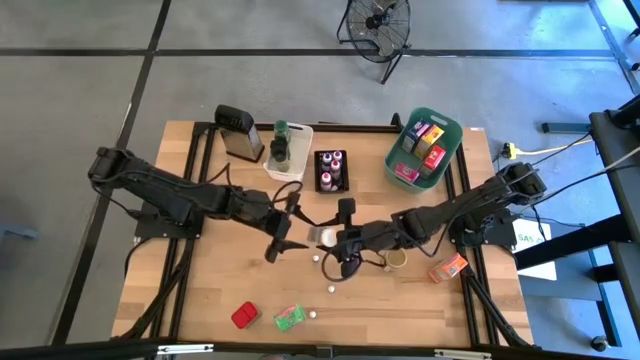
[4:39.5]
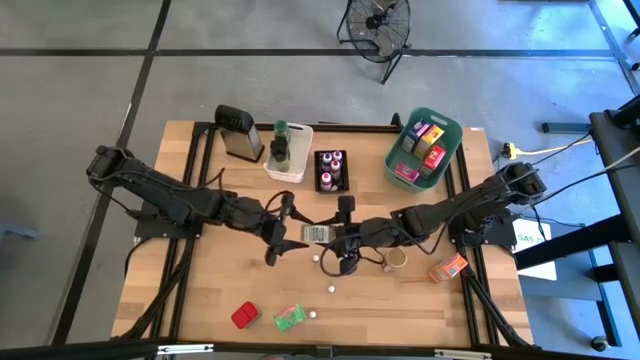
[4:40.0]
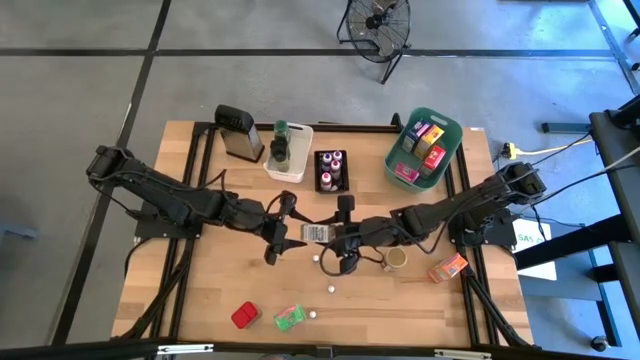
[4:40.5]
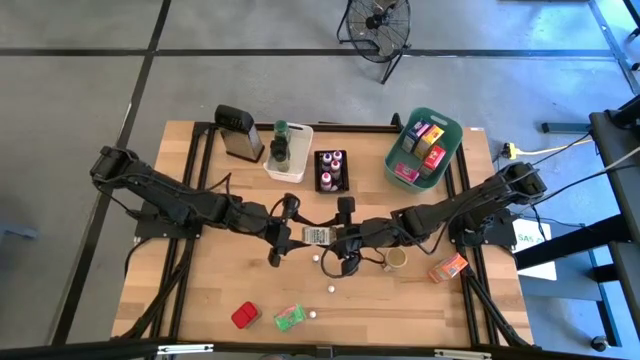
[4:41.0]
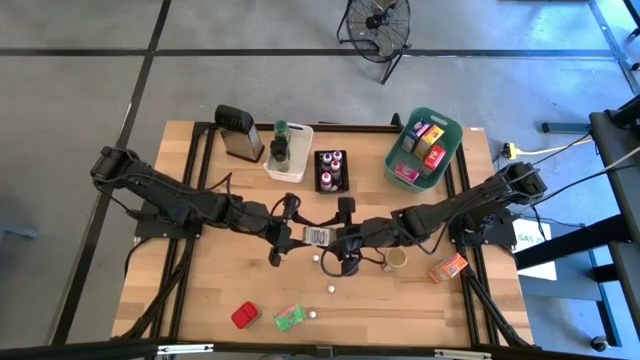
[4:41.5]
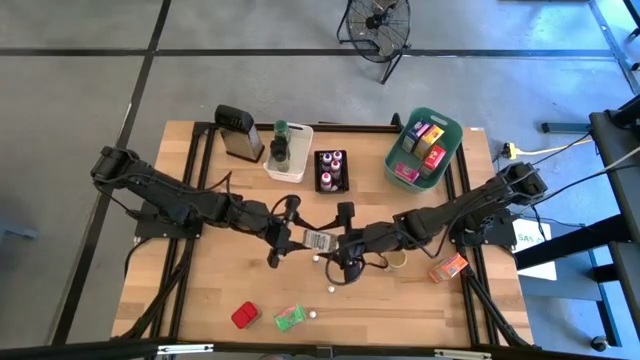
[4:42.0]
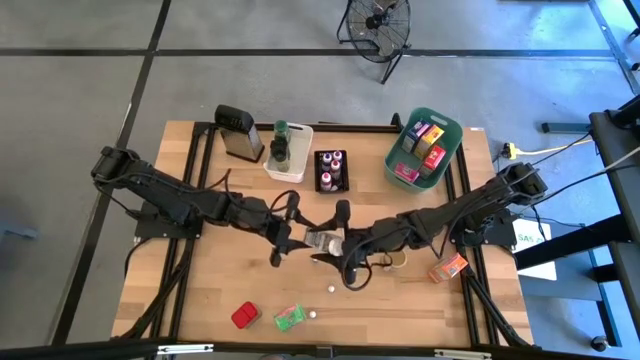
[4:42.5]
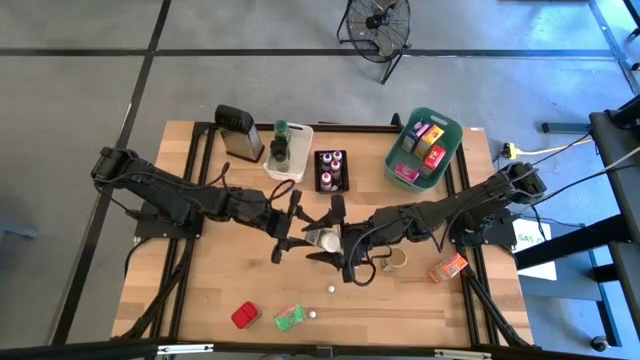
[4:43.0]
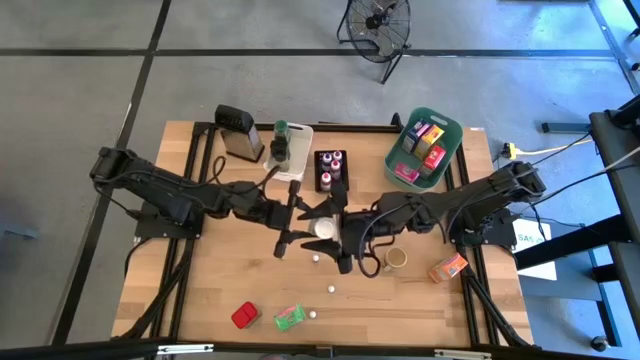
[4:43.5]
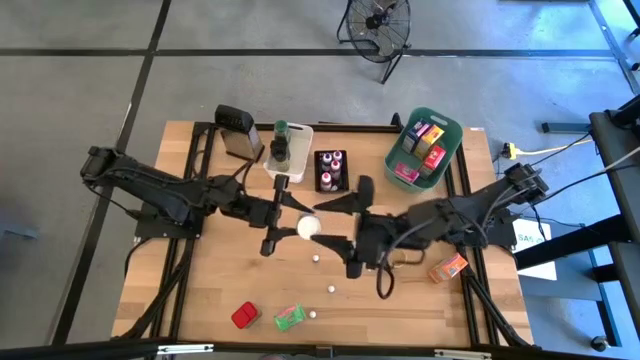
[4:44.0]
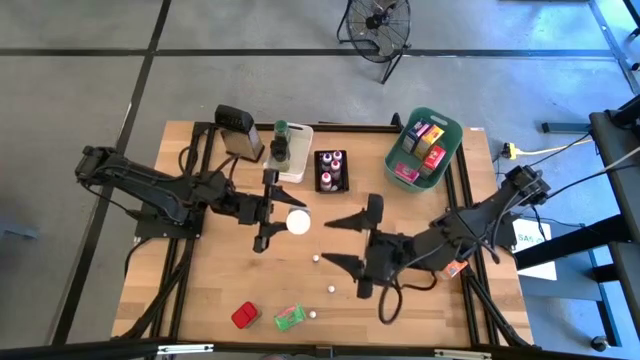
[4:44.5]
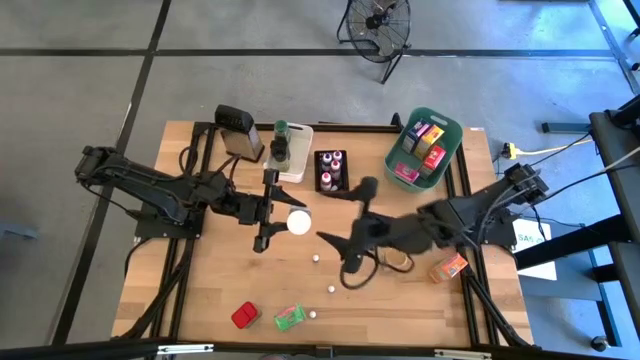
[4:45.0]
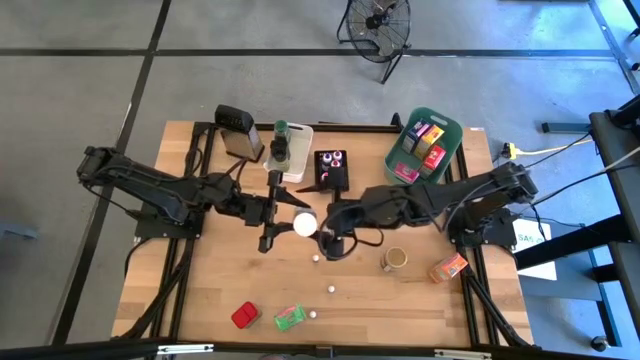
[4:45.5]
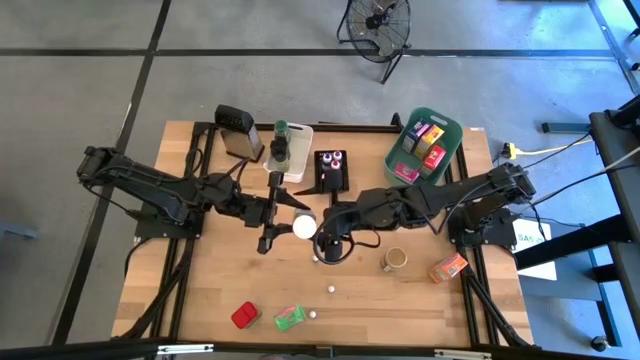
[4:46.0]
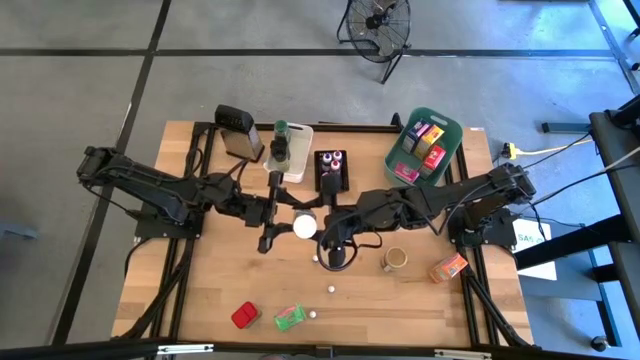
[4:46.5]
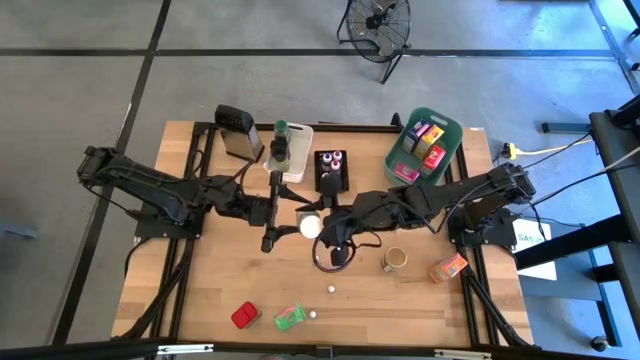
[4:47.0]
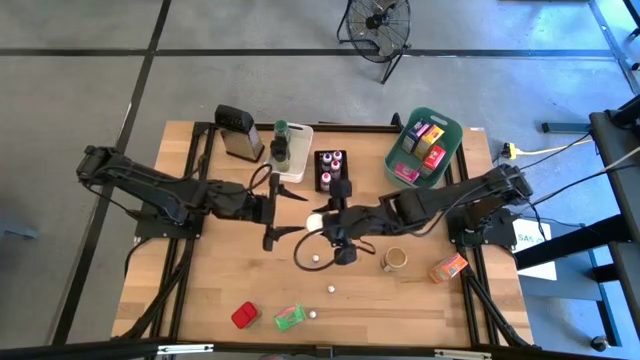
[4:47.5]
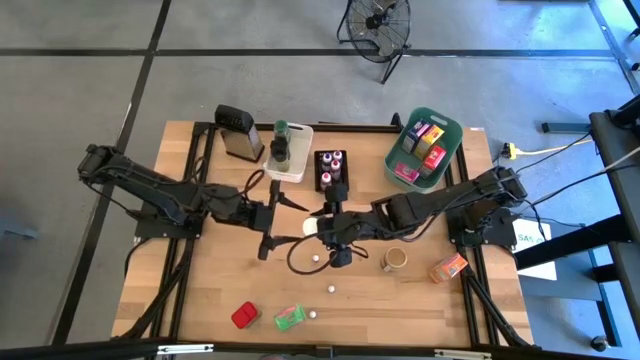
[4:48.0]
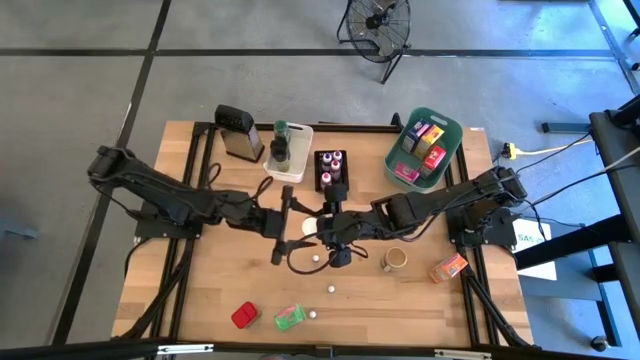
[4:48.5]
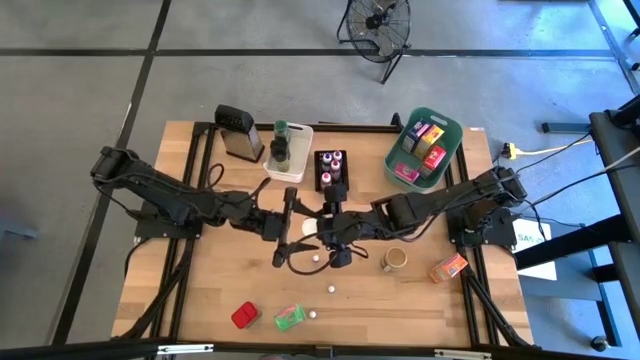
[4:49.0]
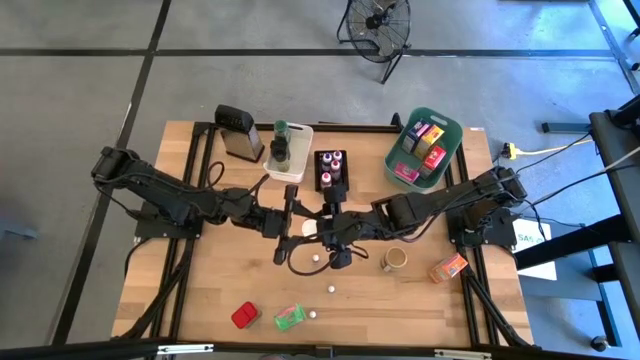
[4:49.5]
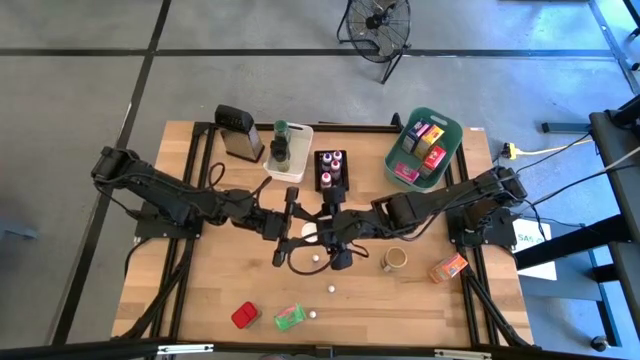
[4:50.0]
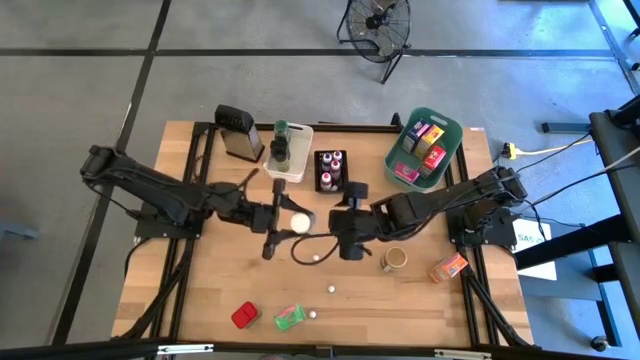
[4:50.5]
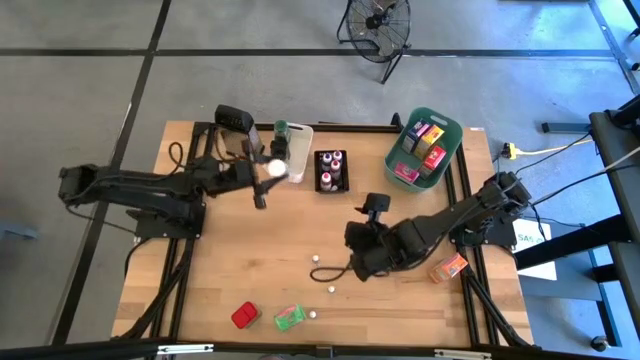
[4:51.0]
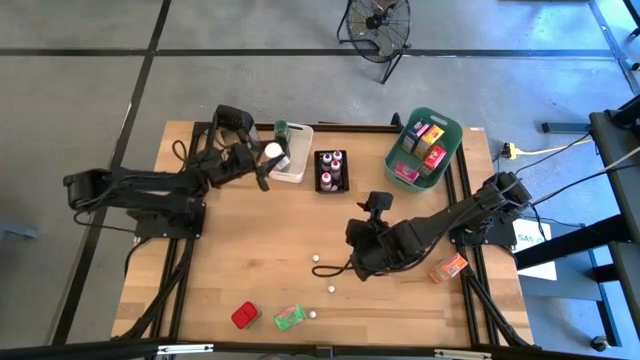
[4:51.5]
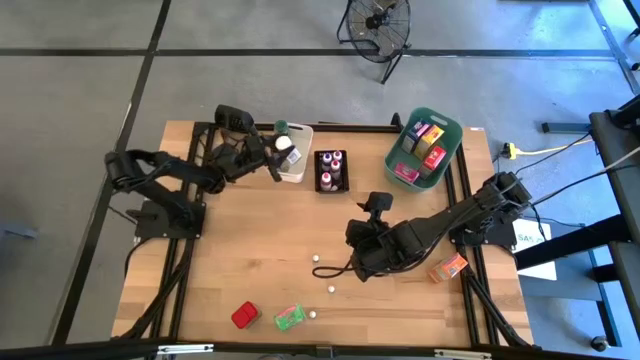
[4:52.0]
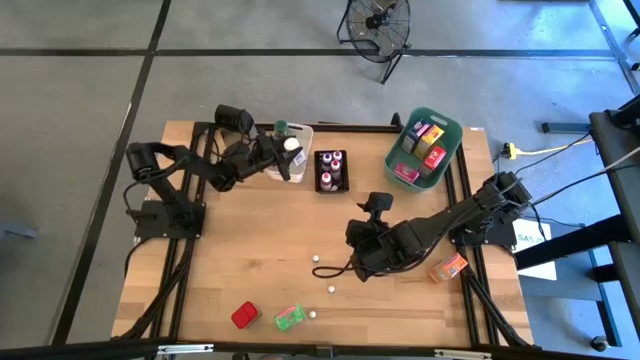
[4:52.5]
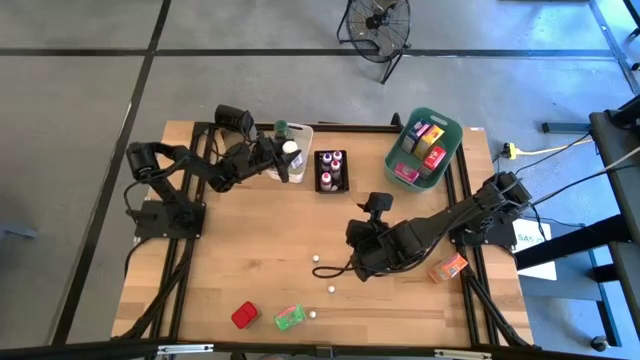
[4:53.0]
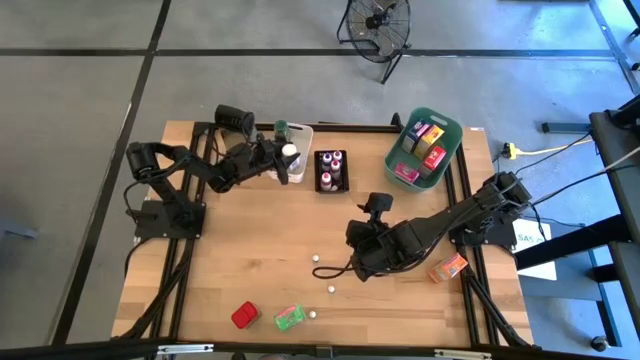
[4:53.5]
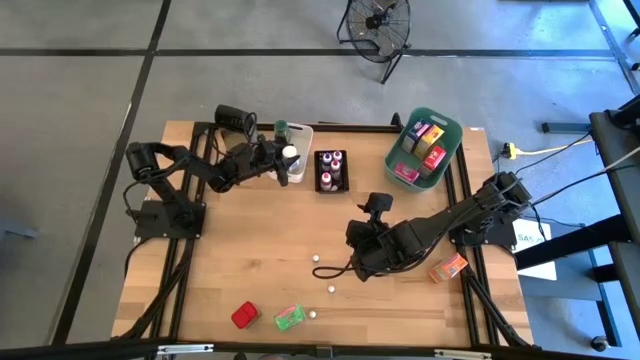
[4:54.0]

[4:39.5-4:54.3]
Task: Pick & Place Kitchen Items
Put the white seasoning bottle into the white bin

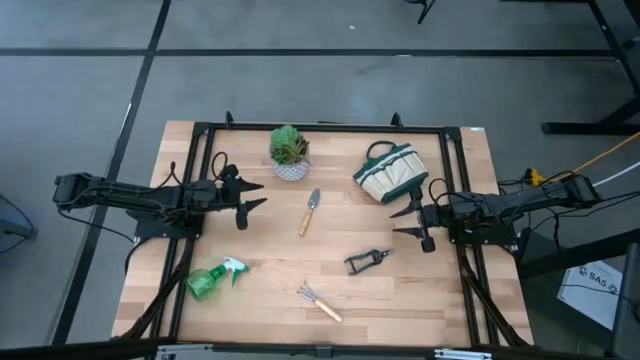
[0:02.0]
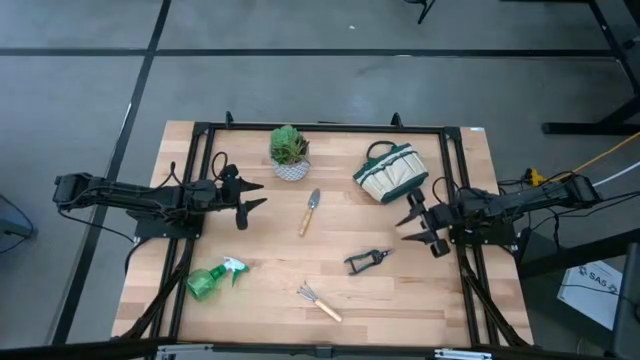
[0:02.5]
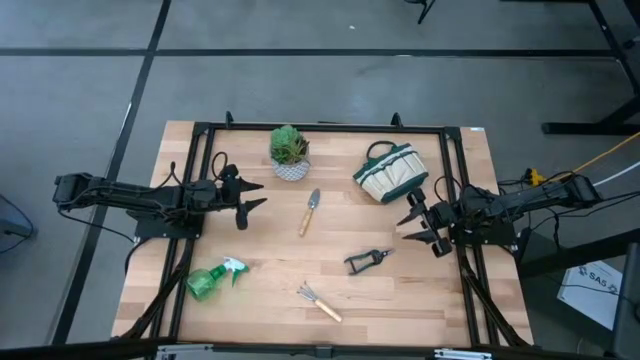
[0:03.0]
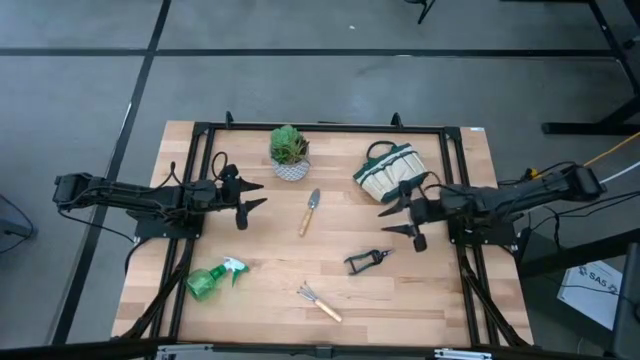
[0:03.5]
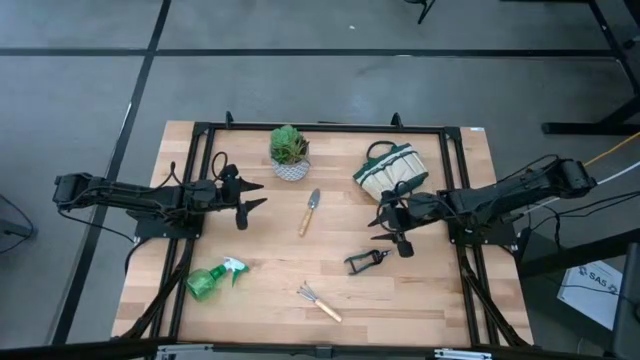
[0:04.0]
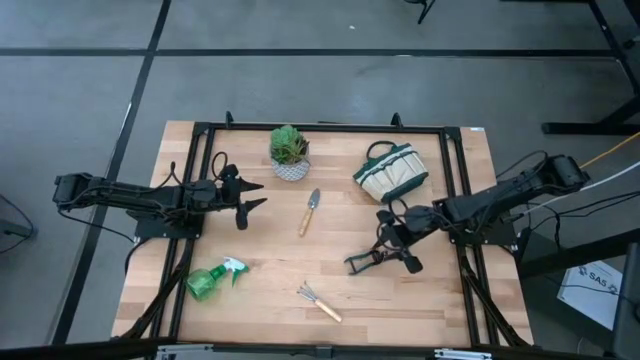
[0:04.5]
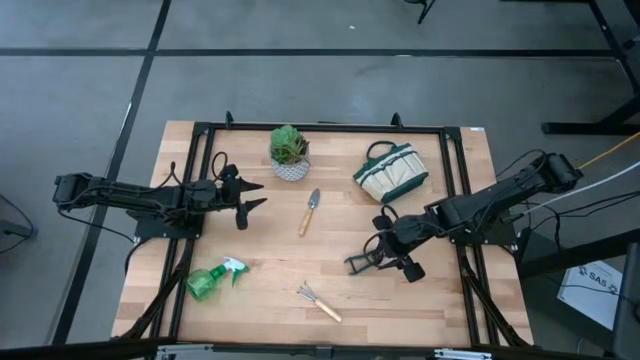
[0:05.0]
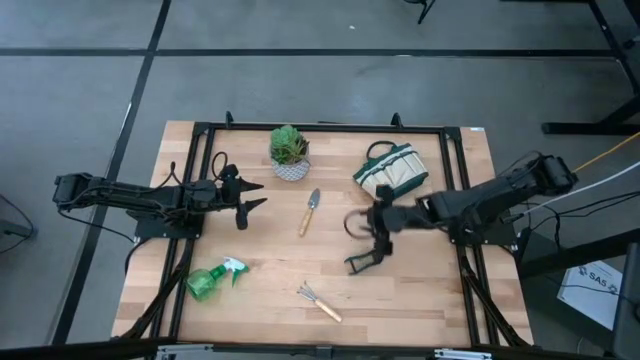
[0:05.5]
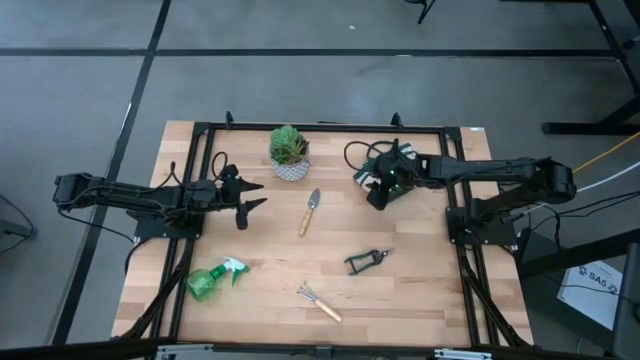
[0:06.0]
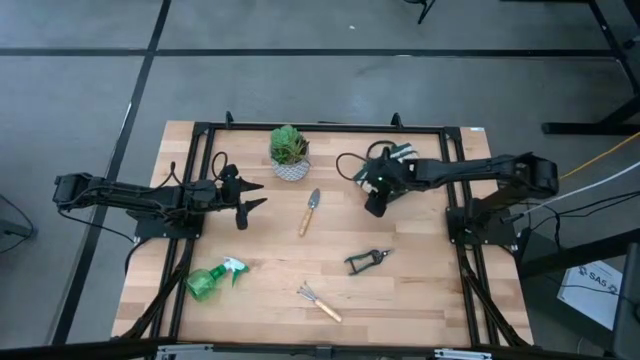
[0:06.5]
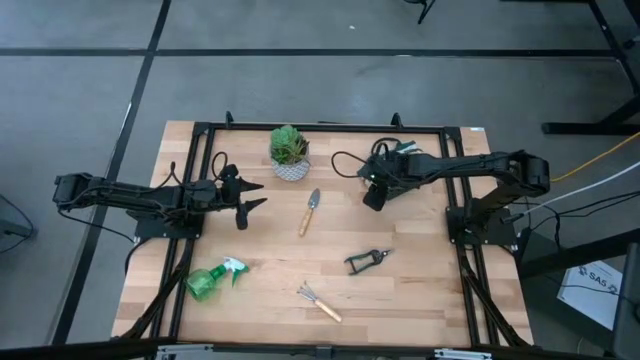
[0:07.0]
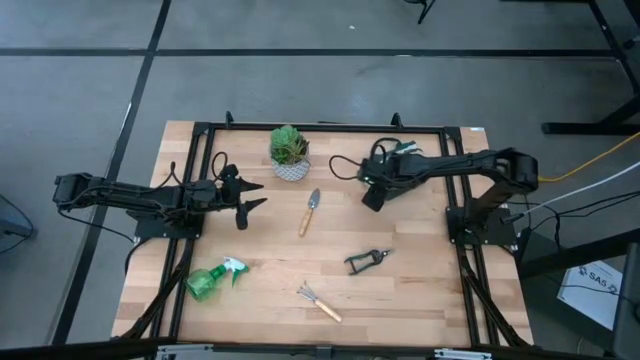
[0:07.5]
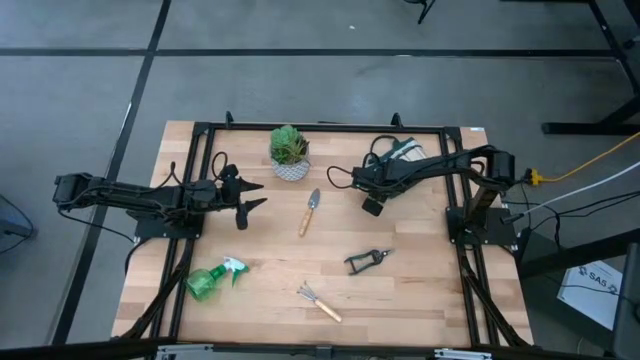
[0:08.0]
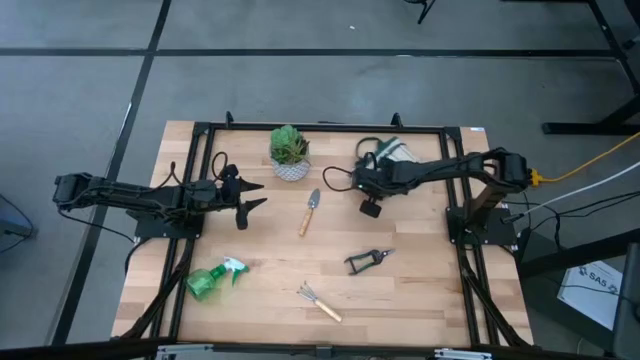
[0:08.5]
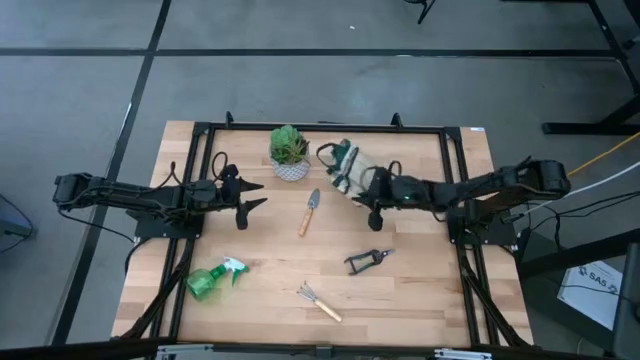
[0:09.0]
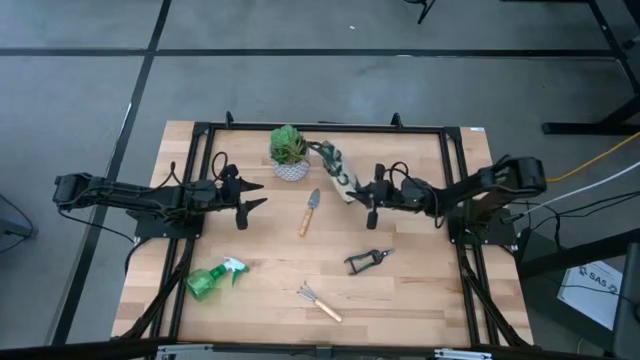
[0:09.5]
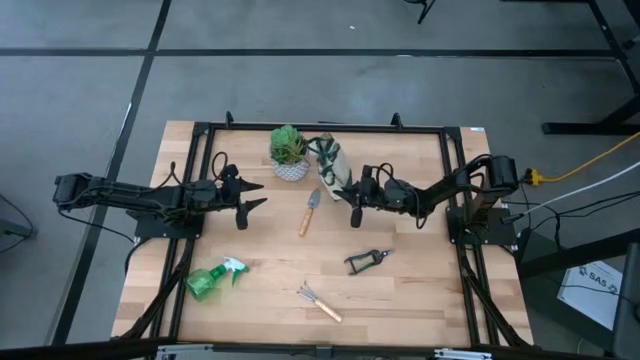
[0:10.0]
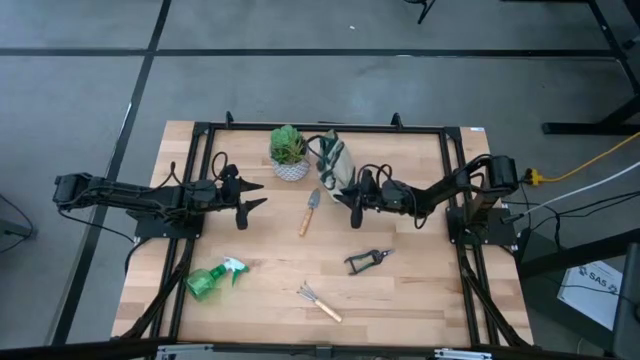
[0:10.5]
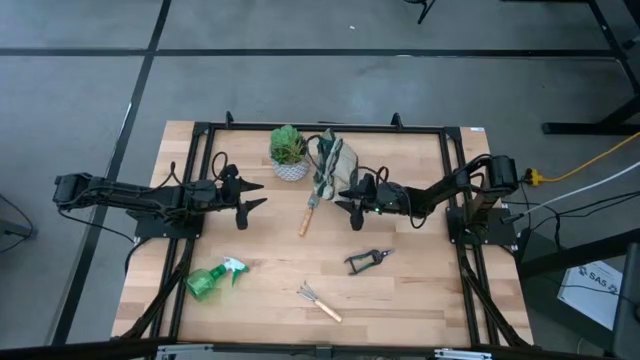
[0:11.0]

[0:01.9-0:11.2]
Task: Pick & Place Garden tools in Gardening bag
Prepare the gardening bag
